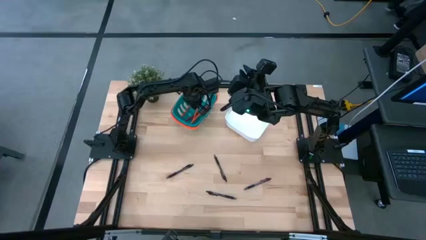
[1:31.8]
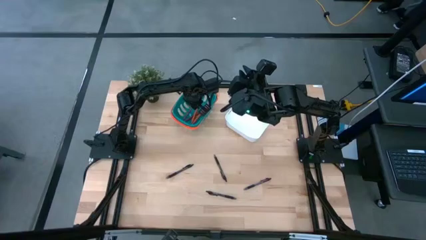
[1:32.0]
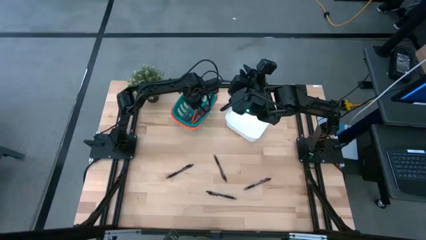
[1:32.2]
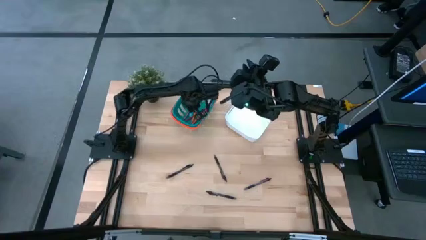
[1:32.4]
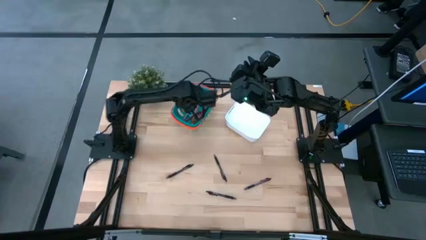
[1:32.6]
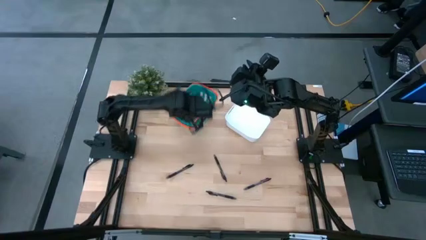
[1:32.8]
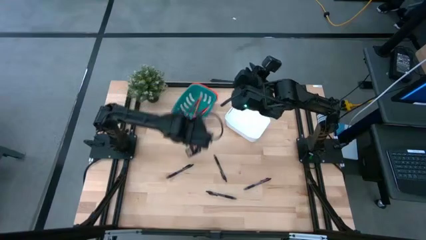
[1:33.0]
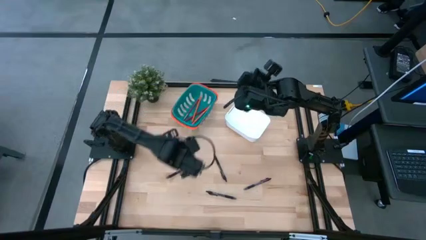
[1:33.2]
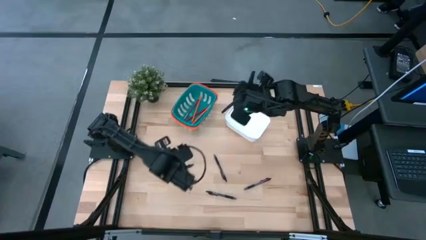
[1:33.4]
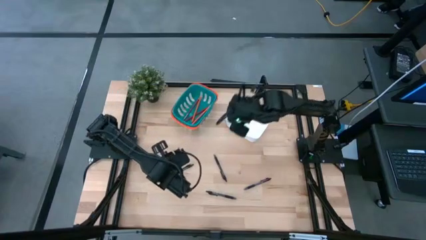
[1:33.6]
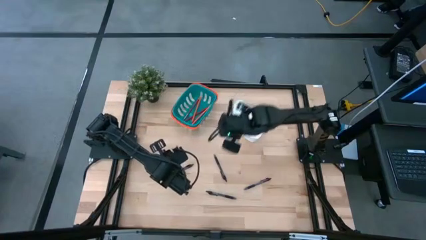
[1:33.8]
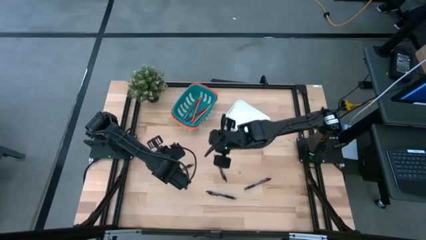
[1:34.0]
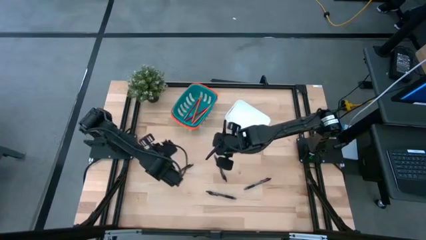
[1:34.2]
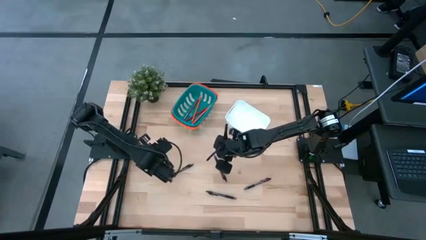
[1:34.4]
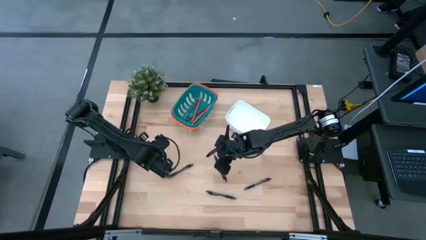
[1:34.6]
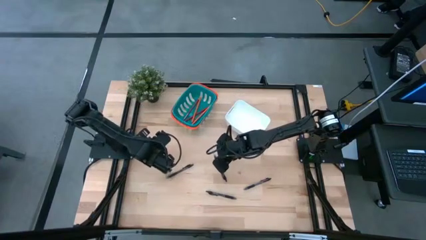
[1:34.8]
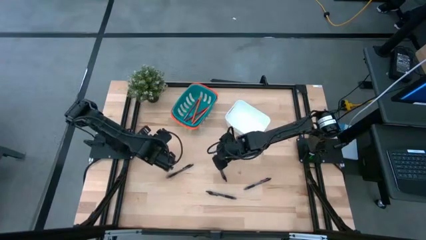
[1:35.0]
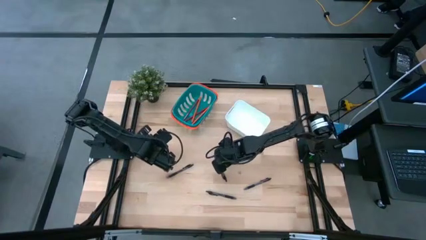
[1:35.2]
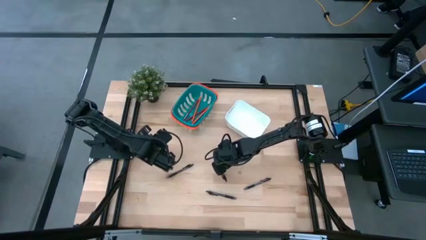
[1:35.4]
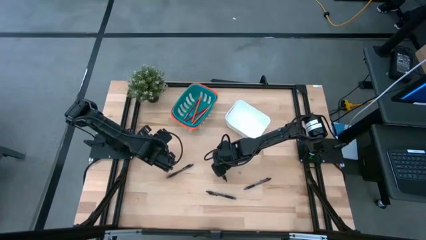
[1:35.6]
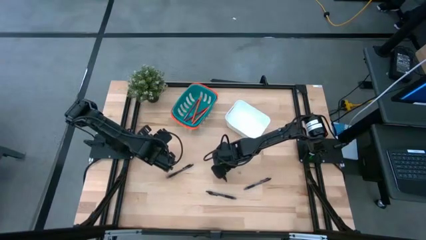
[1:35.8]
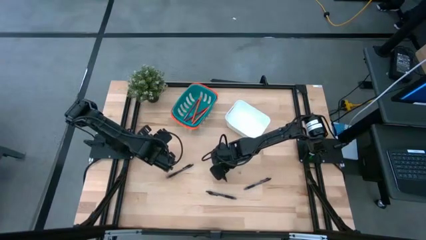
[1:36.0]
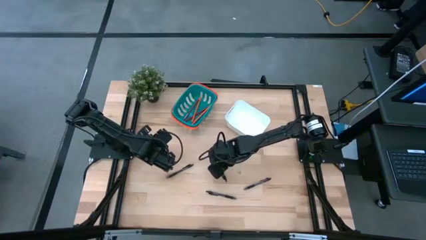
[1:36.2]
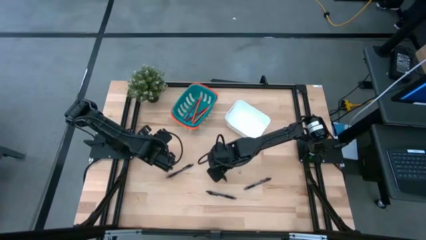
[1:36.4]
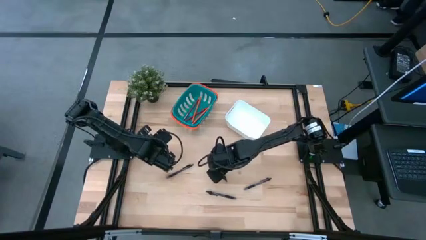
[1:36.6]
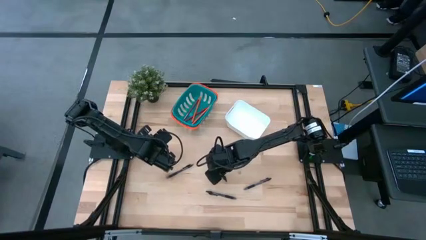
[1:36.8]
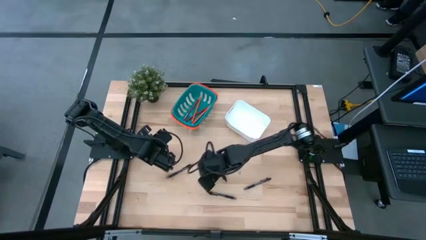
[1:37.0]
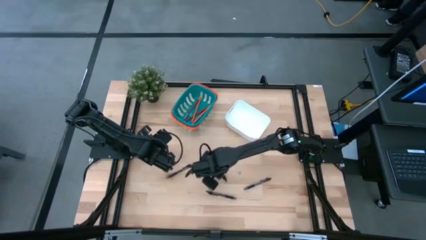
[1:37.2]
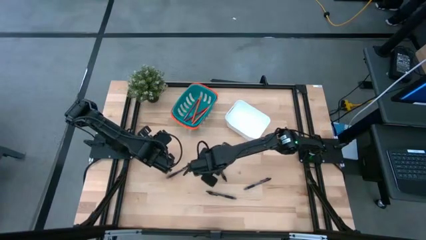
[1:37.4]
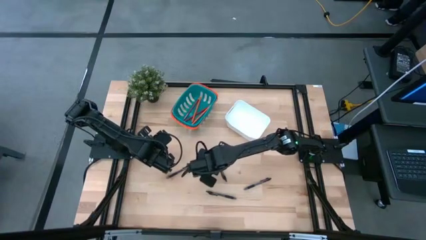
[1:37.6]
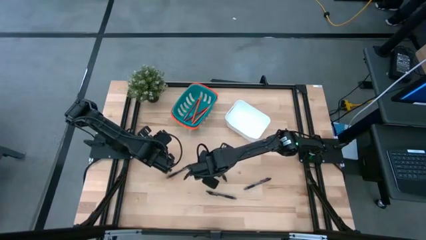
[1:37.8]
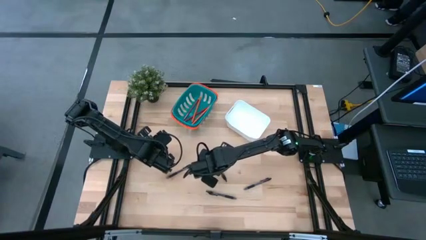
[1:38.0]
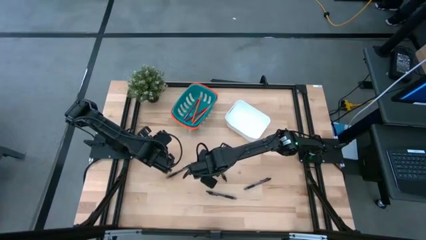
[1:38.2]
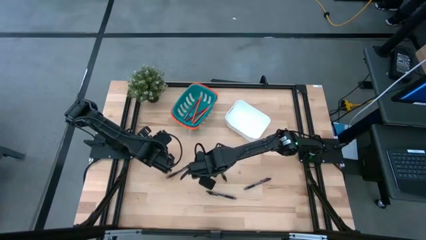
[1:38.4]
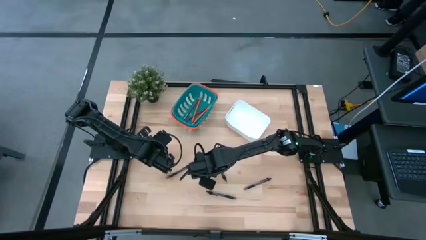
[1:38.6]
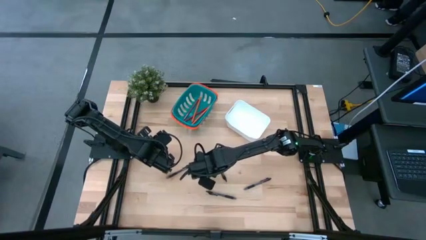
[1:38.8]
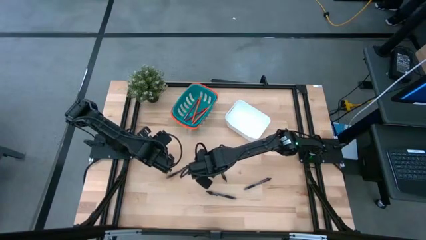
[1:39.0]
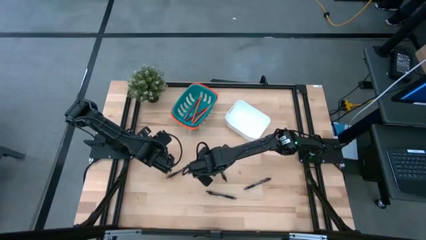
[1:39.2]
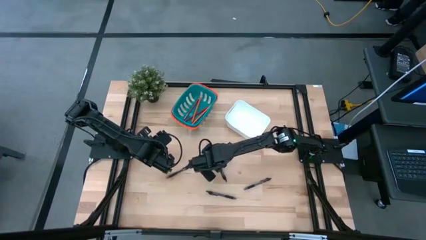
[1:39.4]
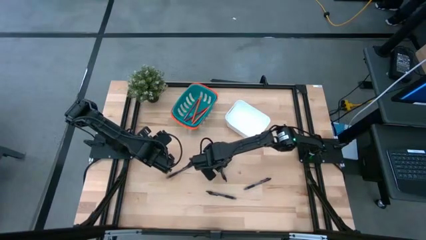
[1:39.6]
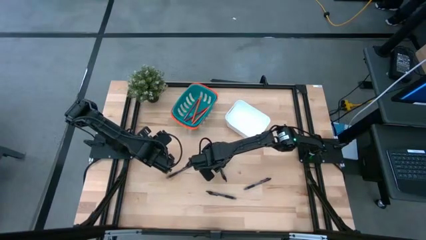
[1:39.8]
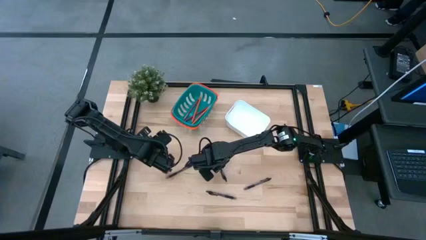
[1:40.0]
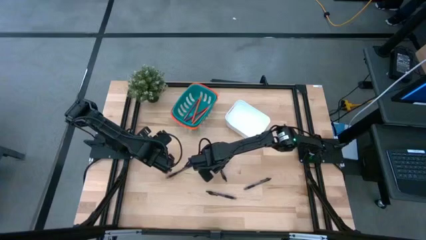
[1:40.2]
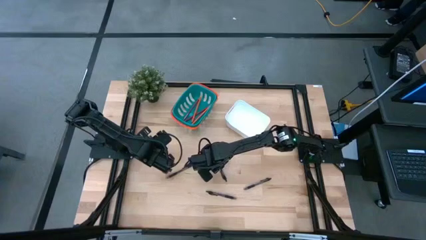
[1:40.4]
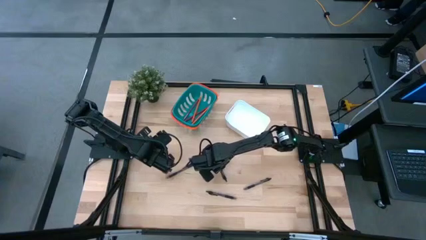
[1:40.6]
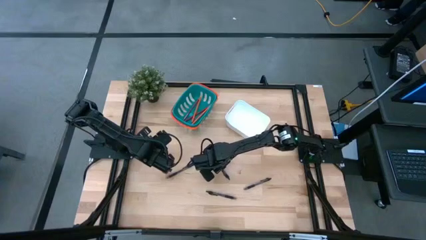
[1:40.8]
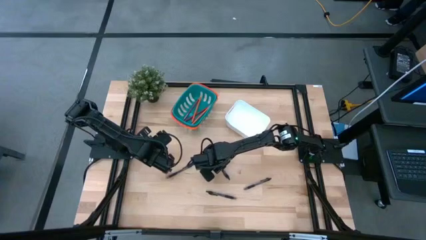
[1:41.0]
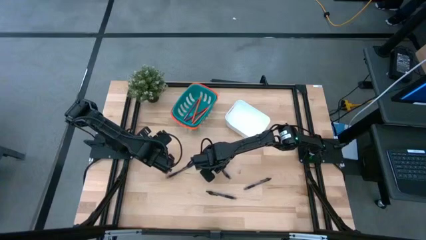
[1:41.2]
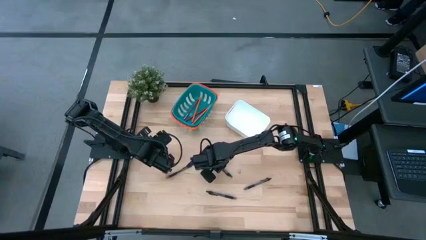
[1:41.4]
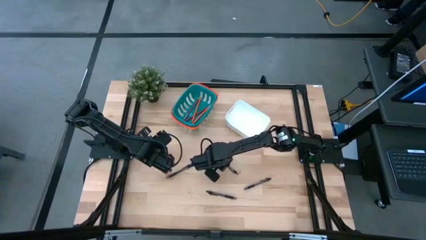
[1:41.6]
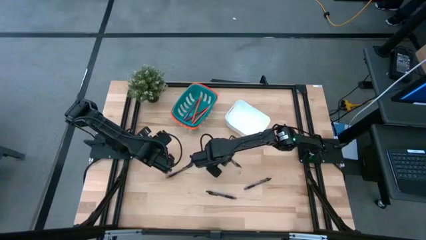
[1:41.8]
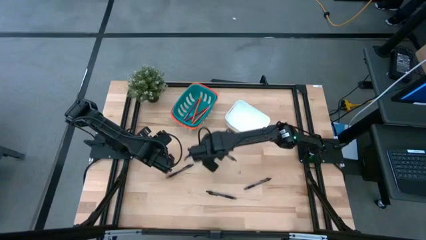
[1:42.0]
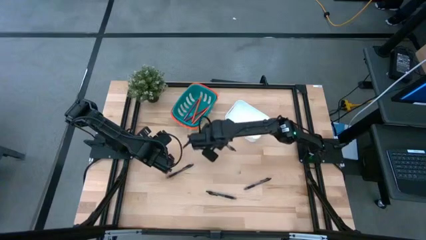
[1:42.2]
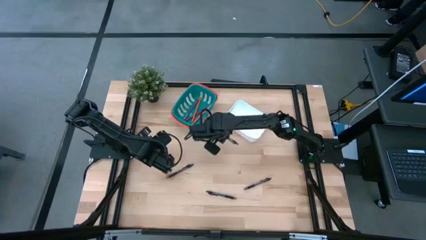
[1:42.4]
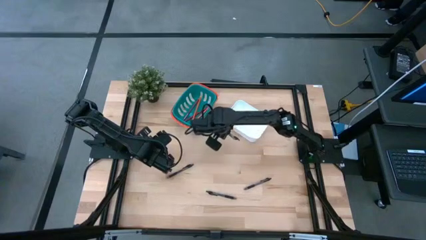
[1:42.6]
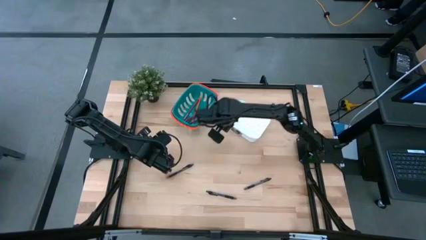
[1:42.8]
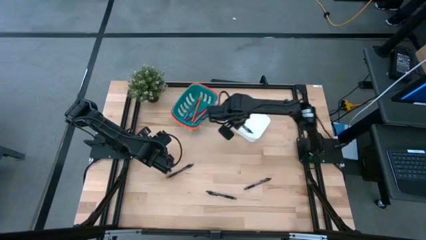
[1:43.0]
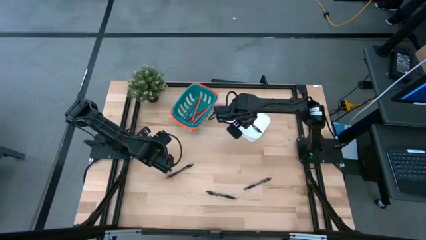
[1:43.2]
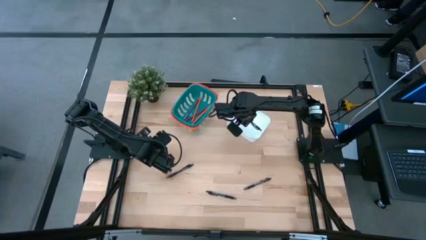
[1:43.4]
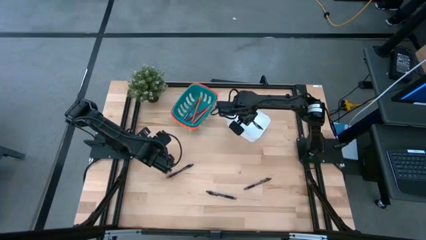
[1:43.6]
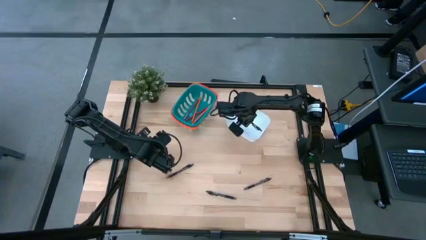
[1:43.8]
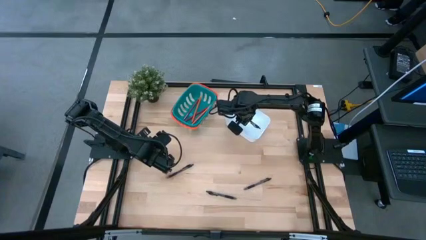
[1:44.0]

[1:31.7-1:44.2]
Task: Sort pens & pencils
Put the top middle black pen into the white bin

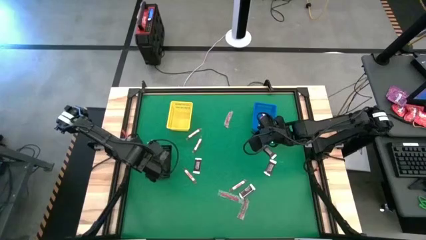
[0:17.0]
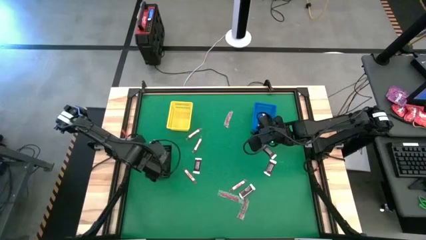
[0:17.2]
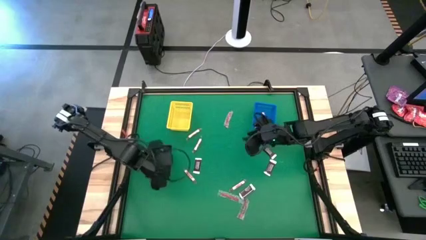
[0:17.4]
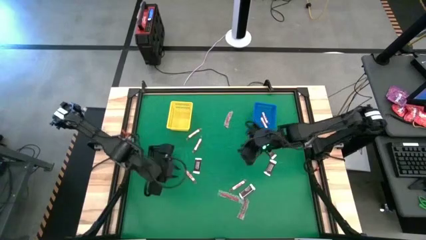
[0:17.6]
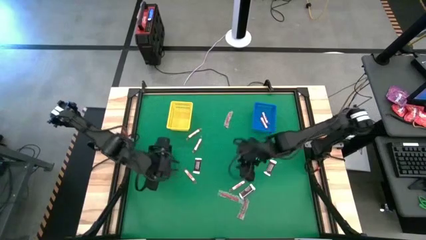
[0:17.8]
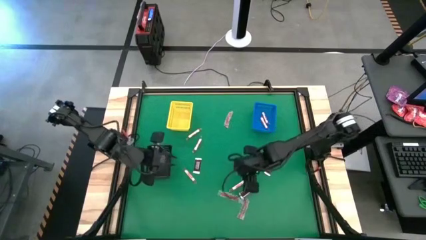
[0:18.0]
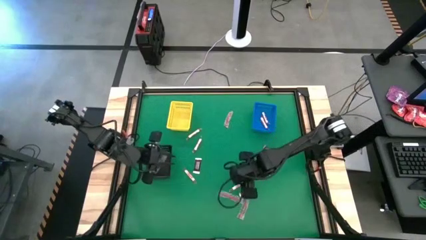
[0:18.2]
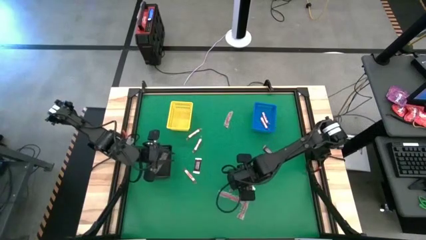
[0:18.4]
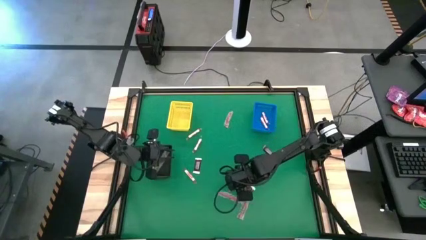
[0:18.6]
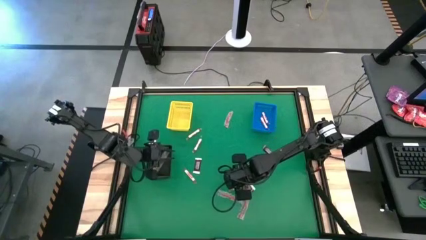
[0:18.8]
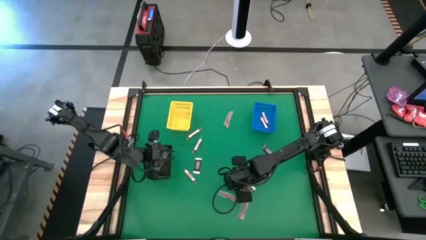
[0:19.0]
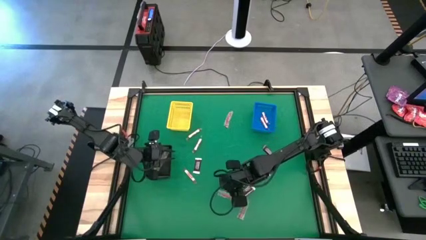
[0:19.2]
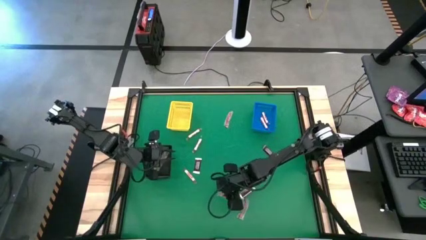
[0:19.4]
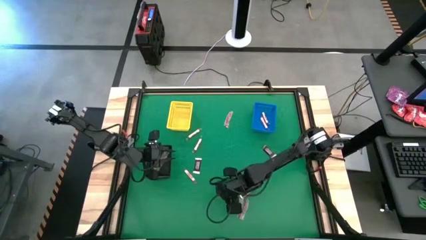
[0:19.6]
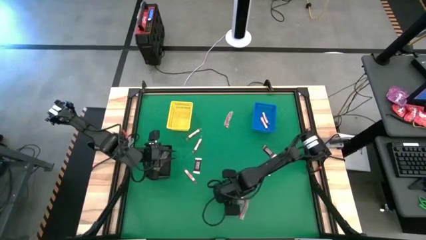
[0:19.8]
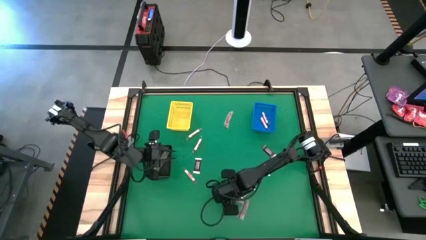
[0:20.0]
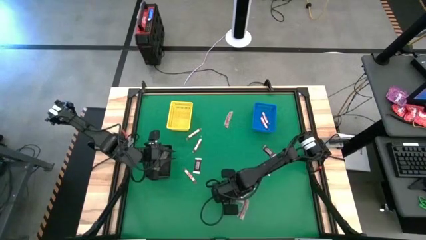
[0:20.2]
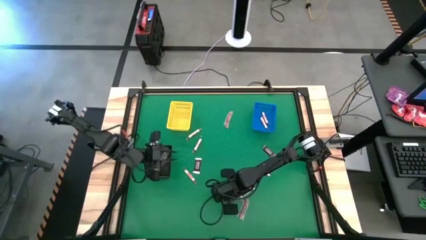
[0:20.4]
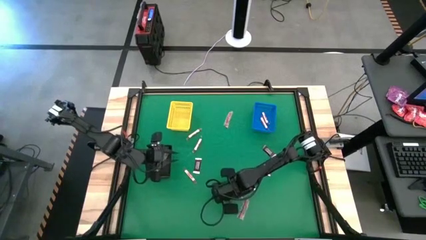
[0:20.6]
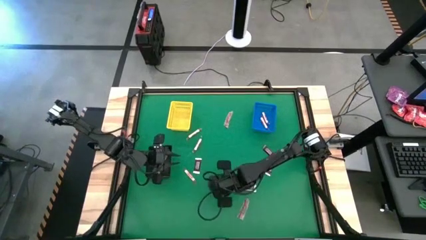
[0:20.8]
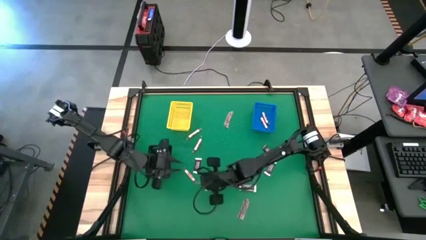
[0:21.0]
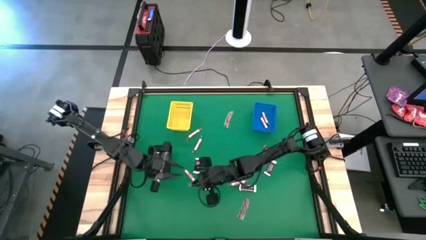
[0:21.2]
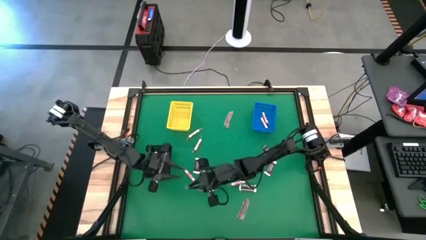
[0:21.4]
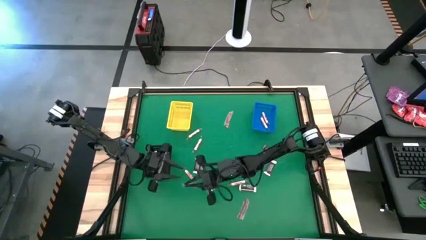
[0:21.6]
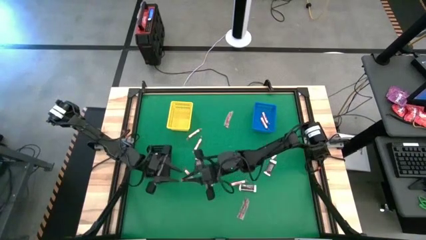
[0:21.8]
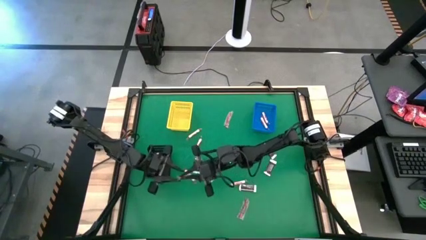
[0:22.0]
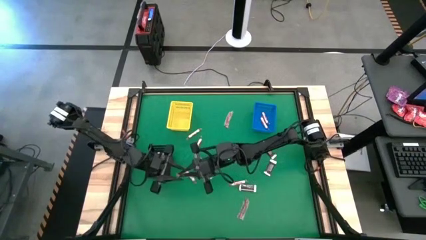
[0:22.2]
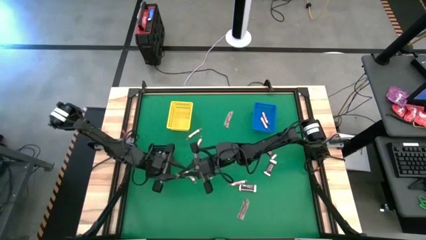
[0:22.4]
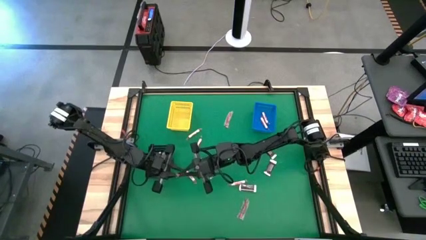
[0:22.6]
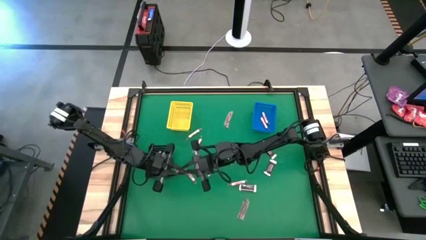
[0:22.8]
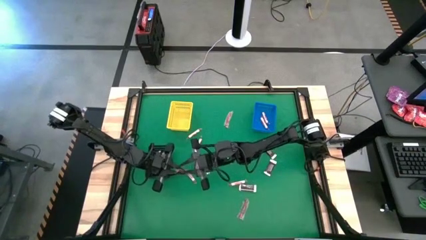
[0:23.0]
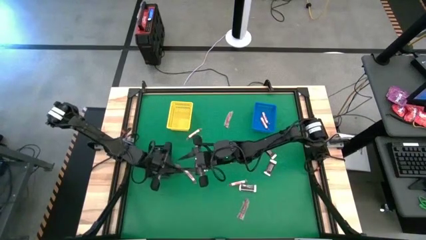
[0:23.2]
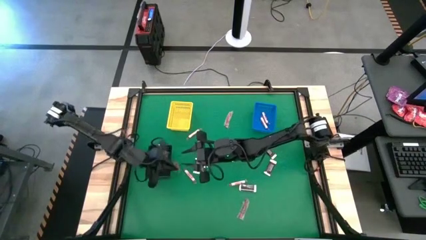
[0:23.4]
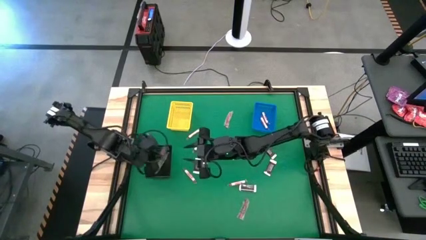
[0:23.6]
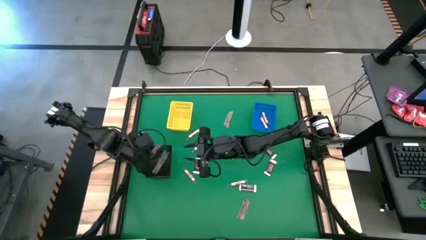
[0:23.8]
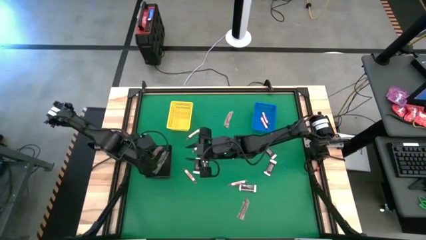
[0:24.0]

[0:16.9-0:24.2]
Task: Sort candy by brand, put in halloween buckets
Put the red candy stick into the black bin
